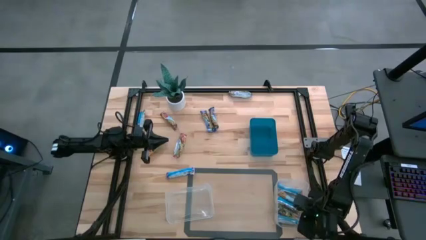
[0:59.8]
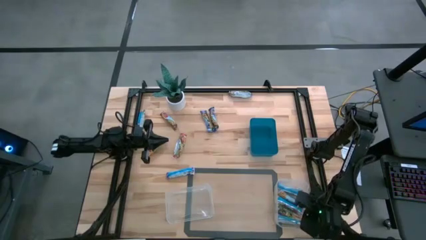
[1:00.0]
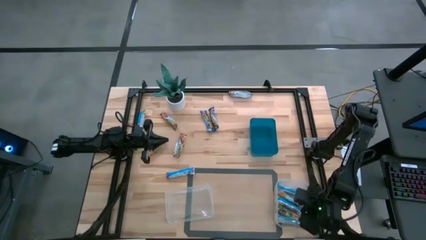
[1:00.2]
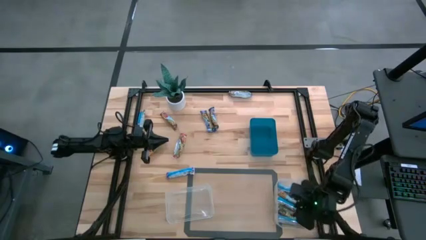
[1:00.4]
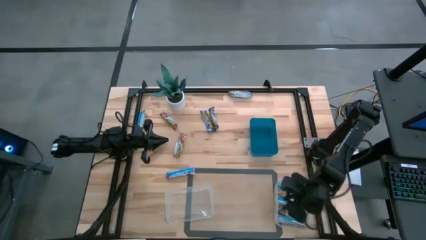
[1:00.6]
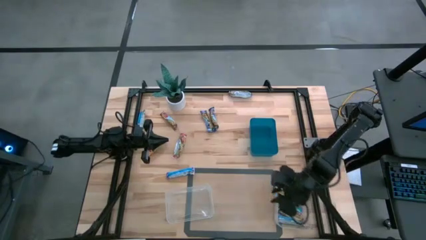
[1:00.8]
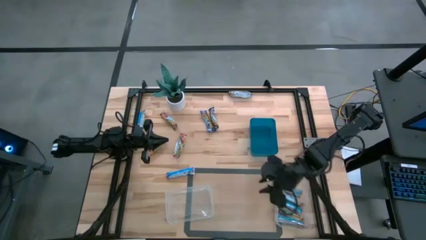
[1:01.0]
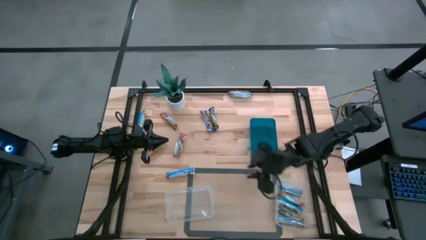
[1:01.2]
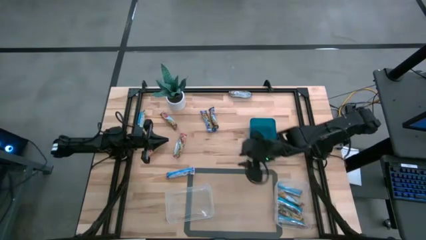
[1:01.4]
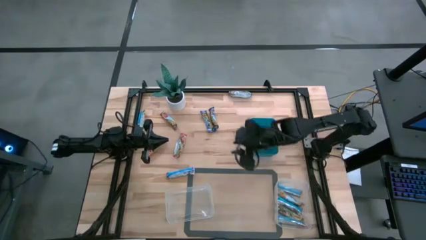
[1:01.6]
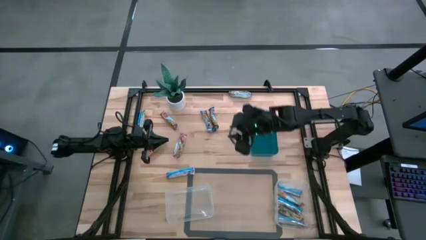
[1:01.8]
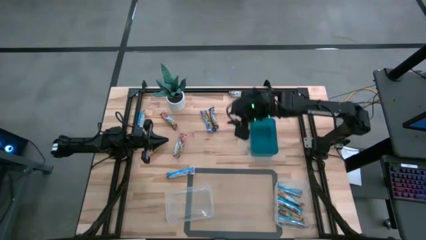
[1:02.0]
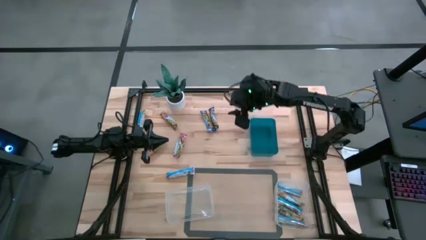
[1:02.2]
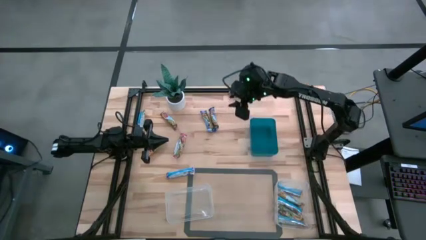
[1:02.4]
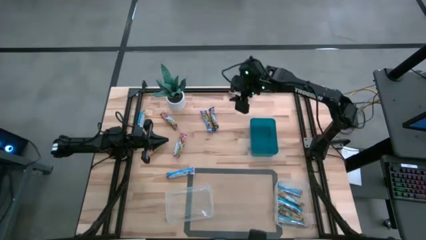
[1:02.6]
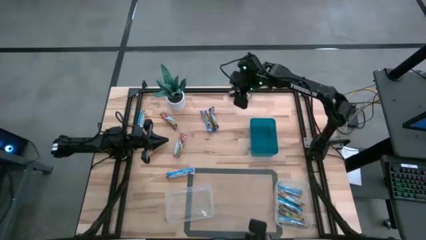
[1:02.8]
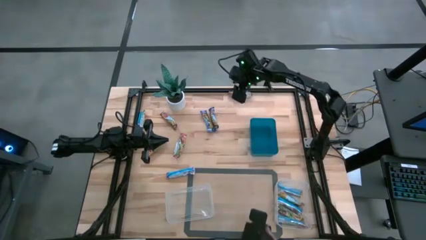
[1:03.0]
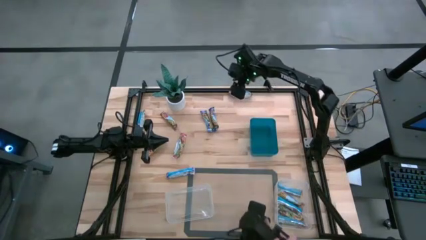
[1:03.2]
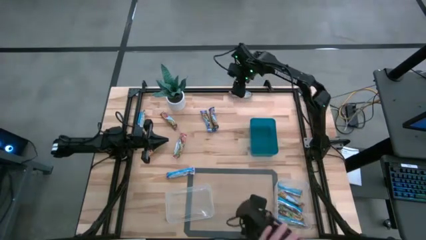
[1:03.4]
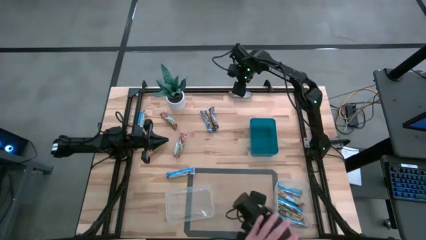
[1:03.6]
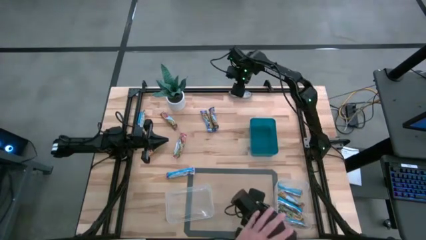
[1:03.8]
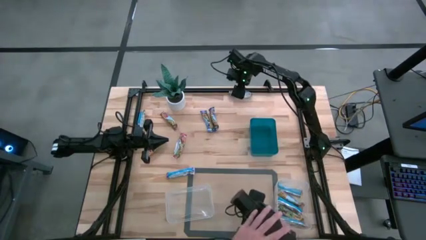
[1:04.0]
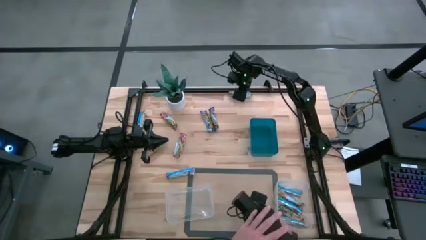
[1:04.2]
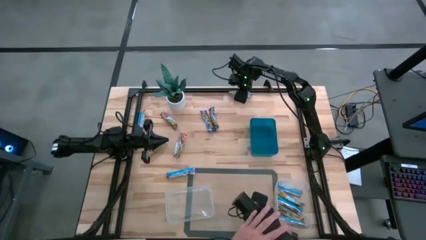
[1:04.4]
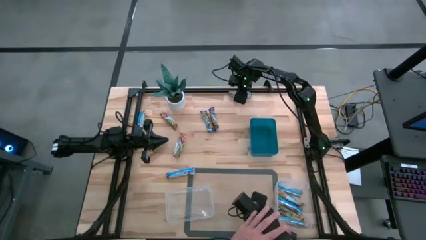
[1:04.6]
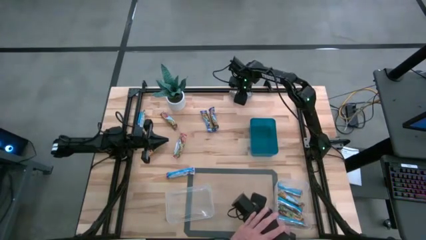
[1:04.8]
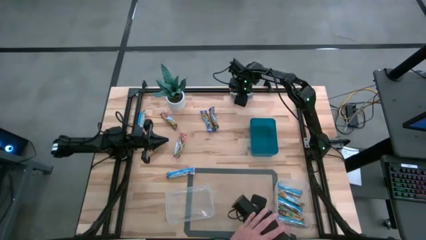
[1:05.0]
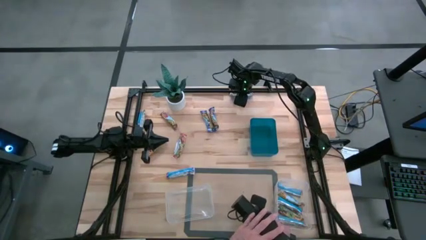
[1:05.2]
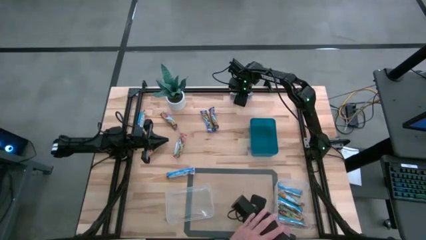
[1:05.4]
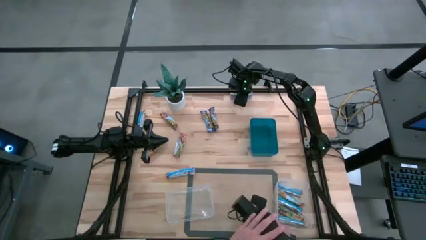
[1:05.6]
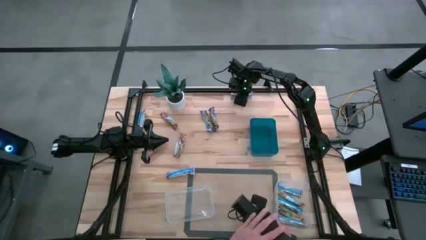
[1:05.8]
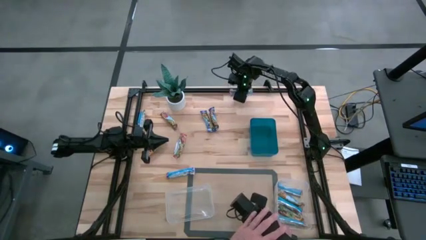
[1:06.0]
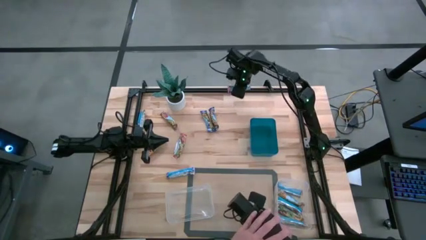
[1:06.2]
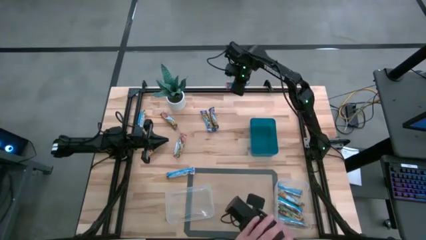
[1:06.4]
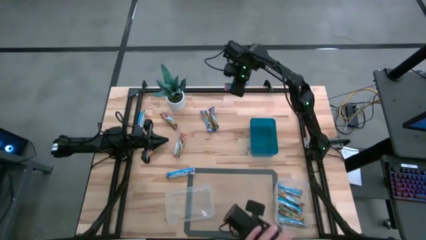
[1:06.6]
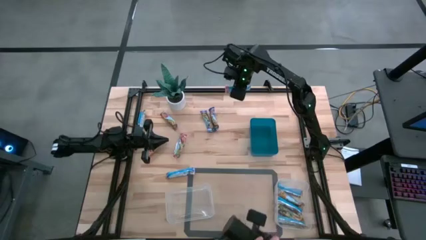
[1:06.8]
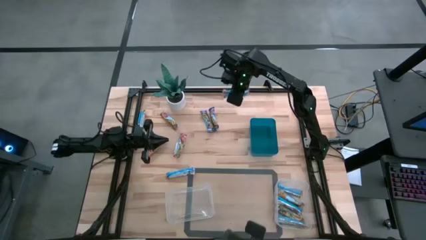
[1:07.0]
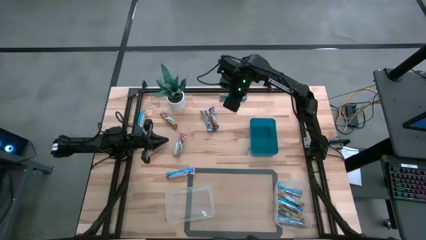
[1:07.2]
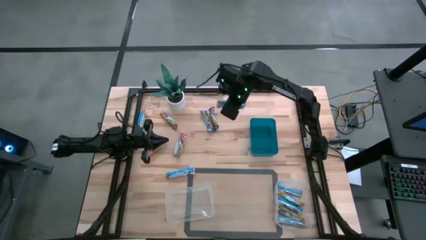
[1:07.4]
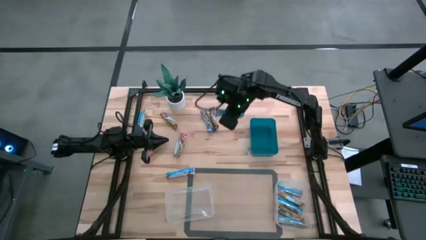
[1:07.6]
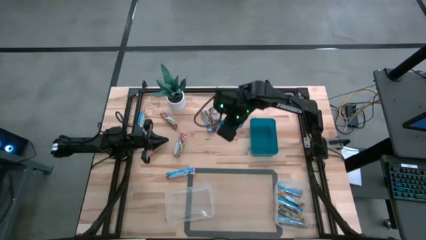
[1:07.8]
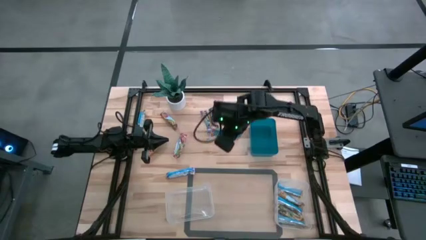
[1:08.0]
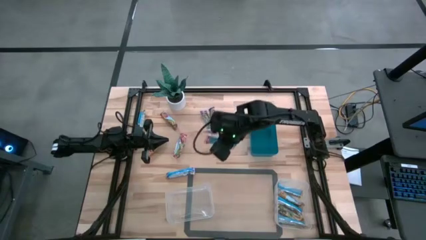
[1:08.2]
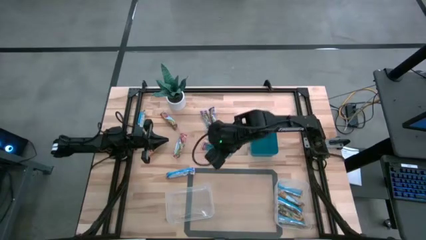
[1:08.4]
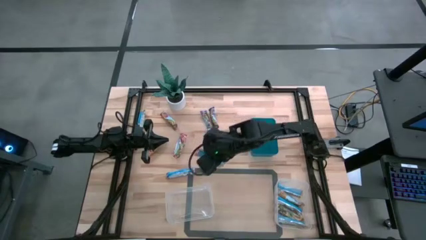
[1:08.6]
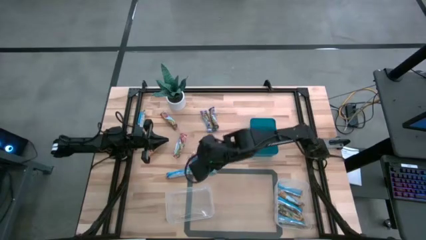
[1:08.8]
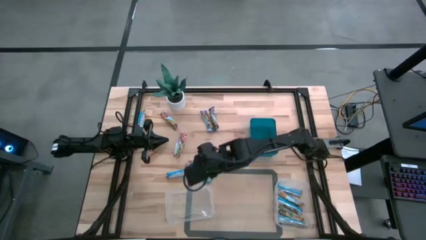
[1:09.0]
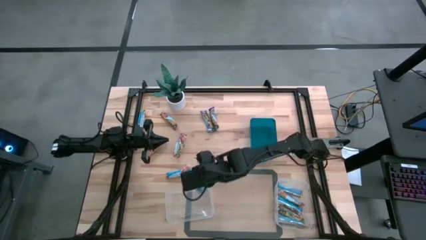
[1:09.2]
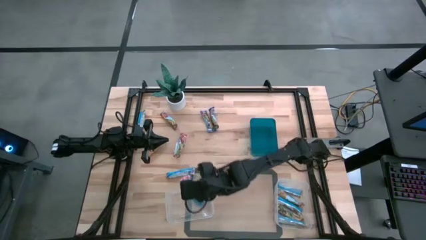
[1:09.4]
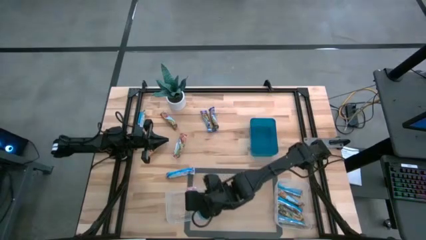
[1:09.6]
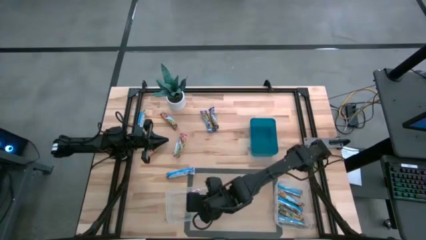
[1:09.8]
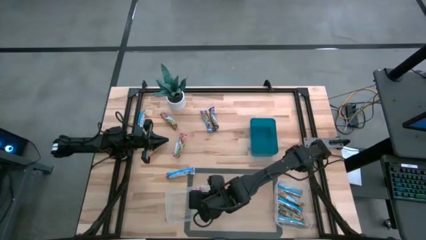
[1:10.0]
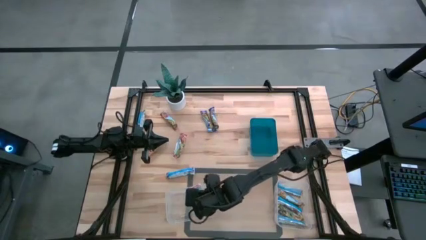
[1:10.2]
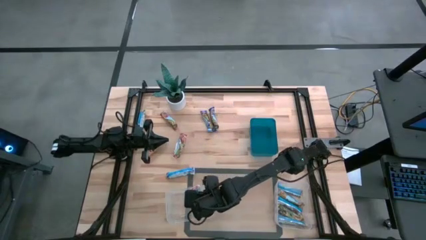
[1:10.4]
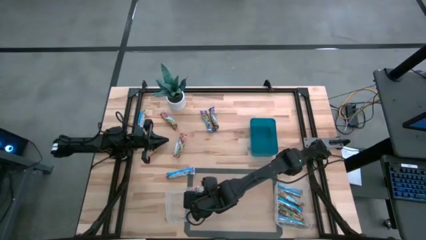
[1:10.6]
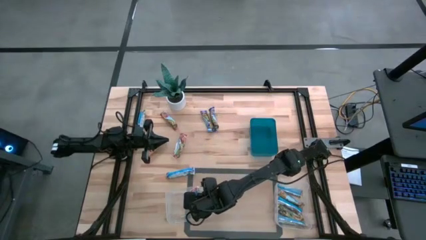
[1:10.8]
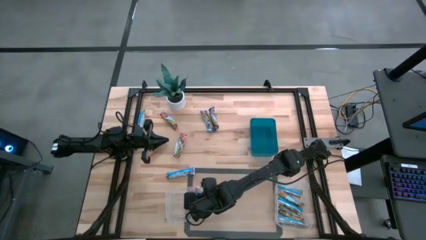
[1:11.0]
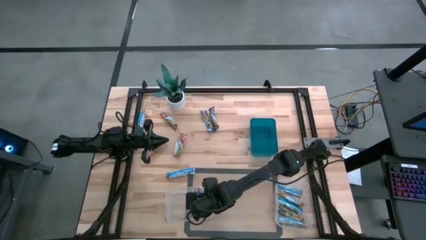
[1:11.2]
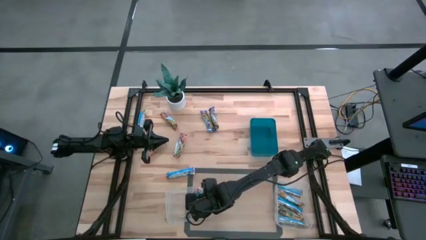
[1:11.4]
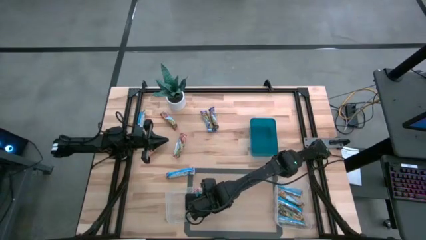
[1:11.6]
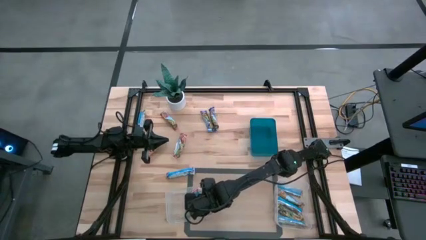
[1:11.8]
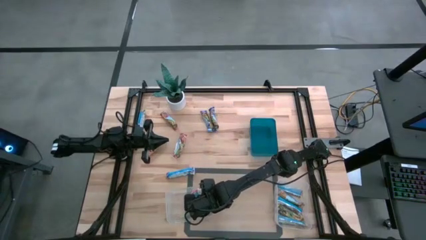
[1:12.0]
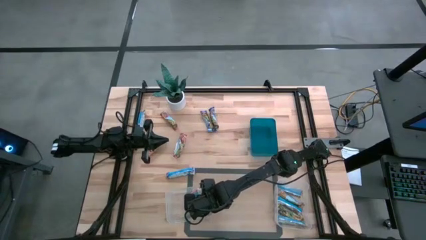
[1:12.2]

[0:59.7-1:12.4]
Task: Pick and place Granola Bars by type
Put the red granola bar into the left transparent bin

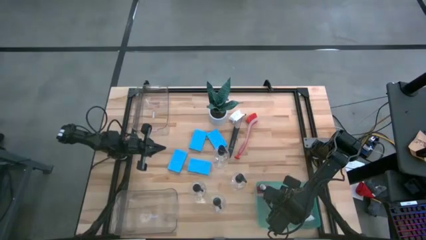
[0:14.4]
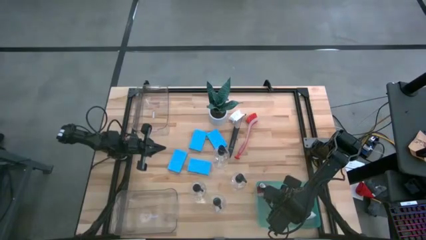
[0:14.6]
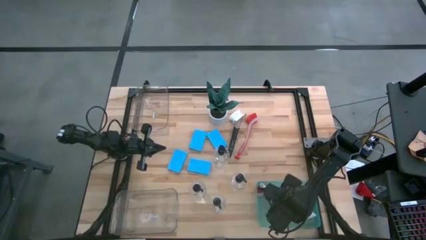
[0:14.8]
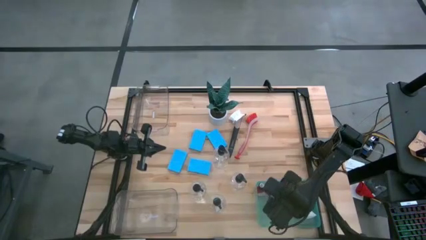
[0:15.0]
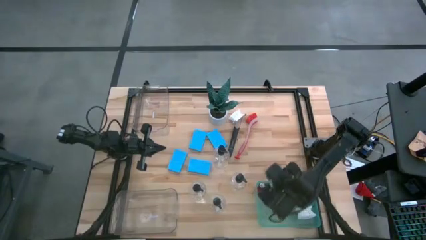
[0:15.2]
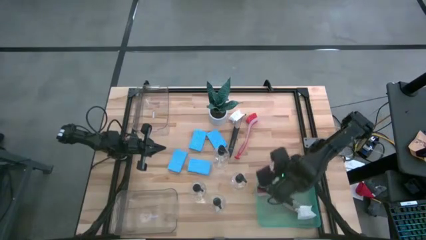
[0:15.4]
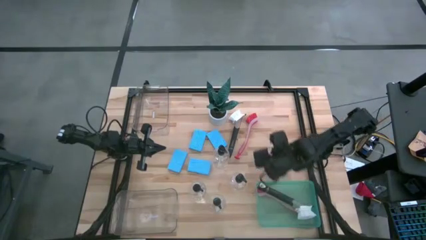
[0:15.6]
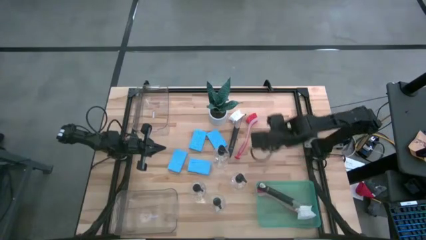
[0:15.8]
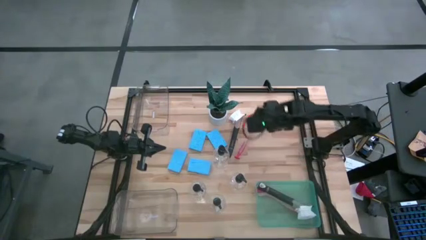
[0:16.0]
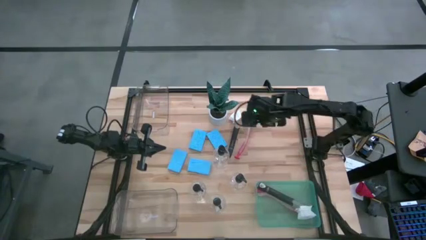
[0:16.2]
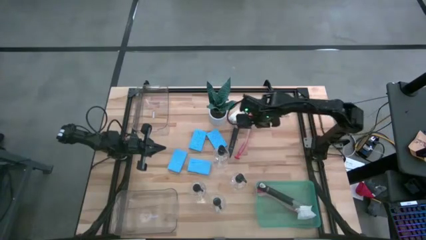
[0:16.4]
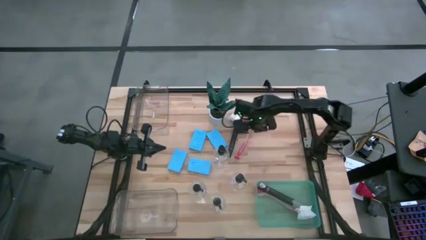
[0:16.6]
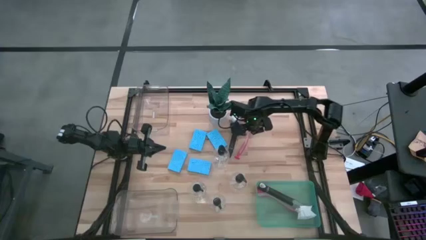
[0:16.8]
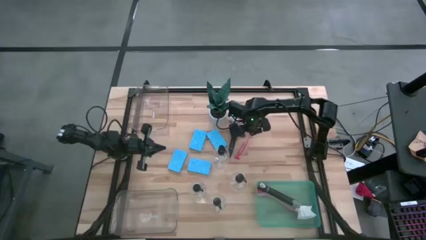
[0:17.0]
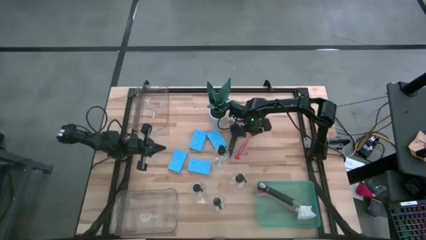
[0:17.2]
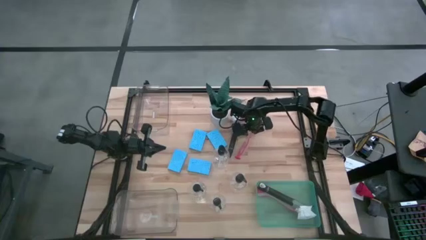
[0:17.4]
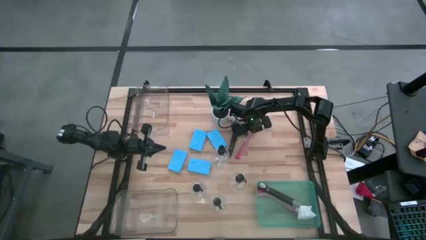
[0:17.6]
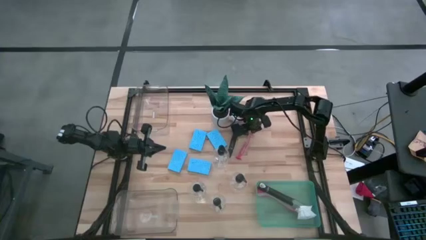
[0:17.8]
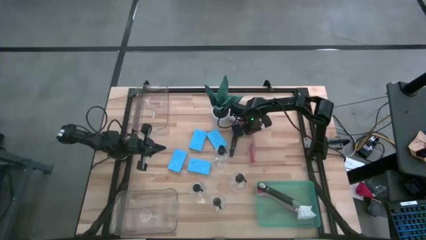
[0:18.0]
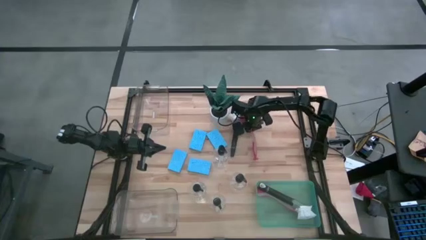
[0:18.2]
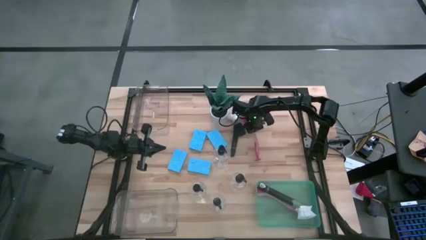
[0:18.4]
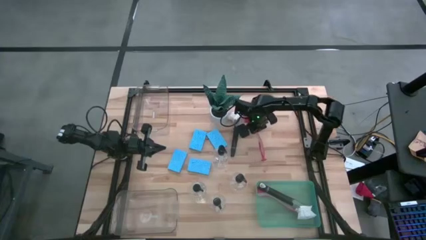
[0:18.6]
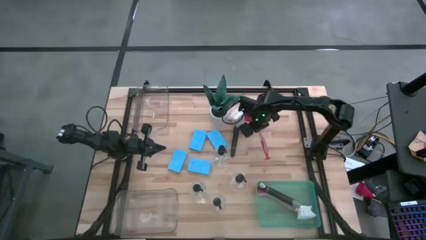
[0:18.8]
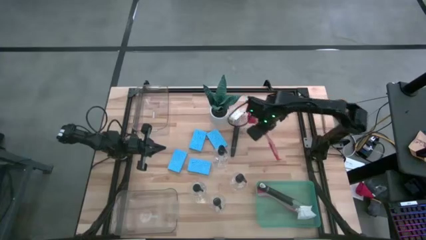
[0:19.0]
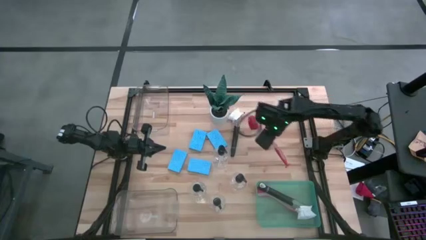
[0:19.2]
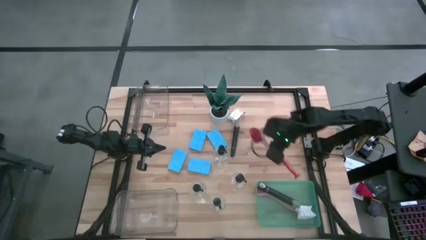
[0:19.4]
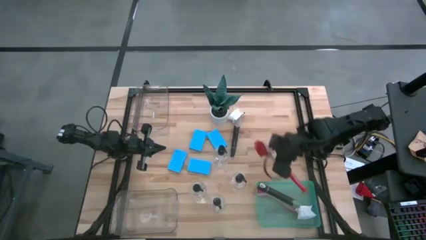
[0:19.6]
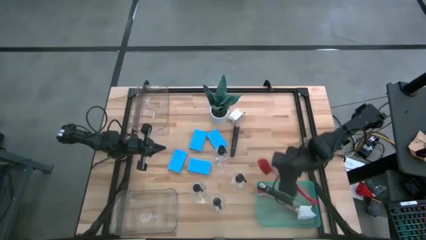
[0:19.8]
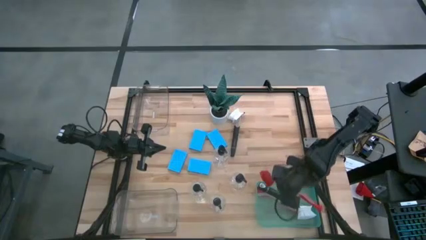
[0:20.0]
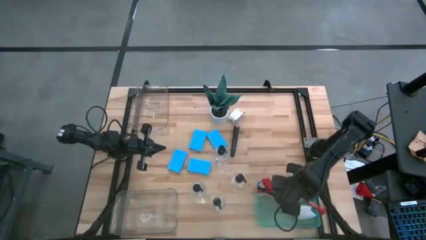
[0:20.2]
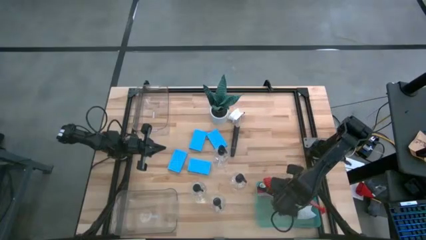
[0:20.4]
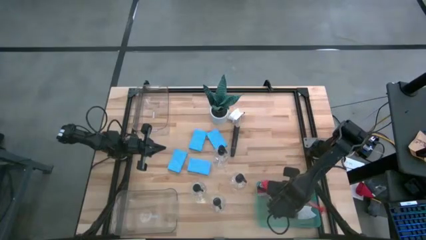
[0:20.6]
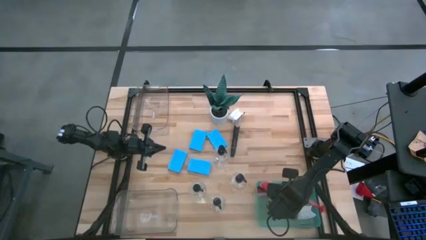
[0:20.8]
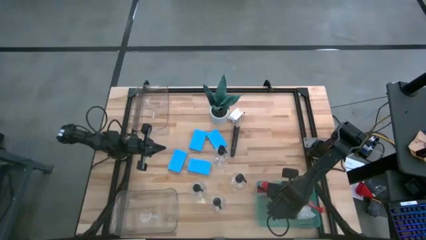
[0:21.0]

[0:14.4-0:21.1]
Task: Pick & Place Kitchen Sink Supplies
Put the red dish brush into the green bin
